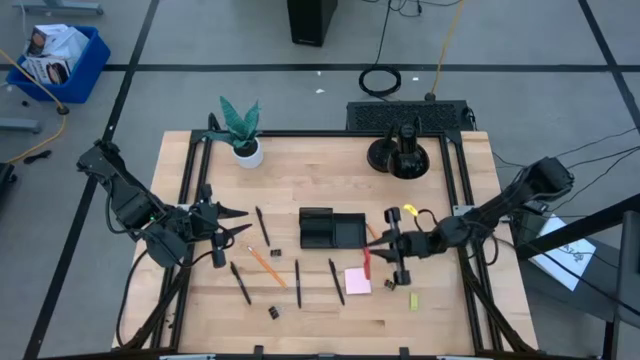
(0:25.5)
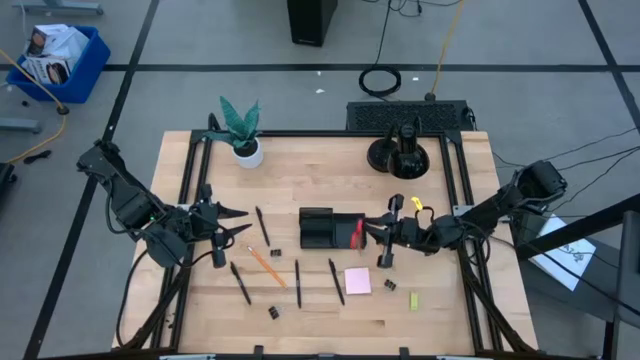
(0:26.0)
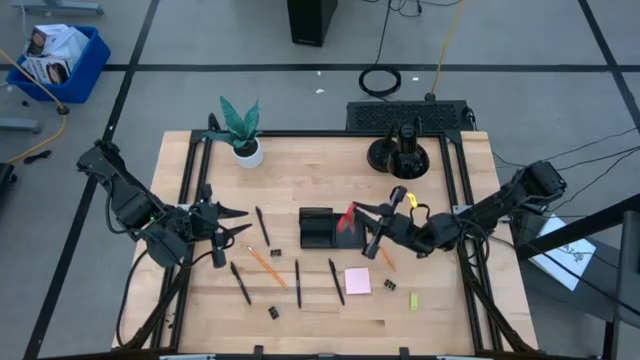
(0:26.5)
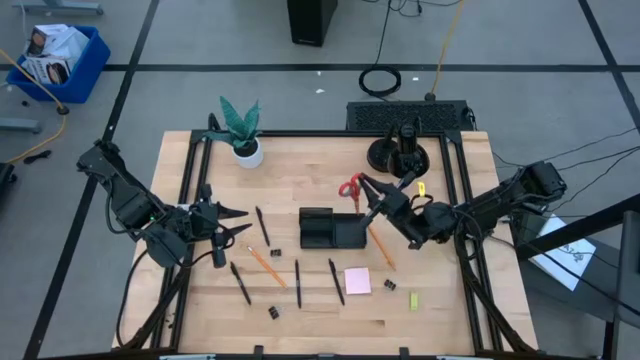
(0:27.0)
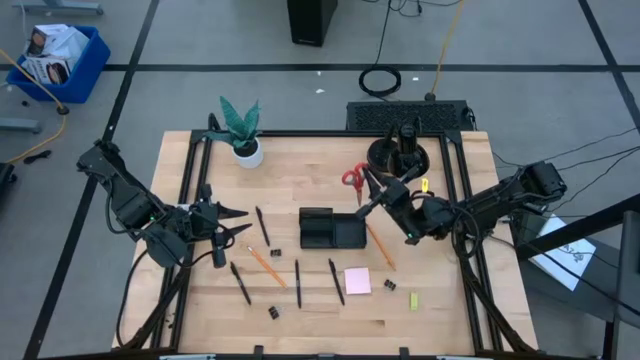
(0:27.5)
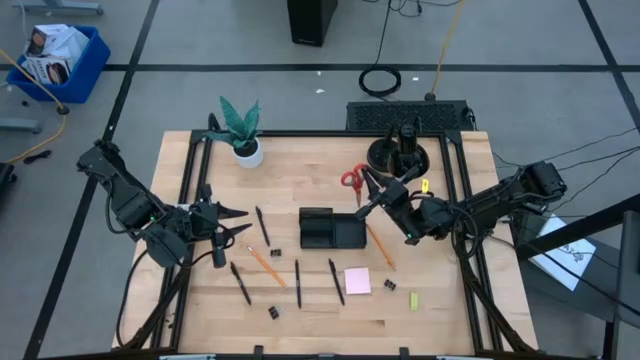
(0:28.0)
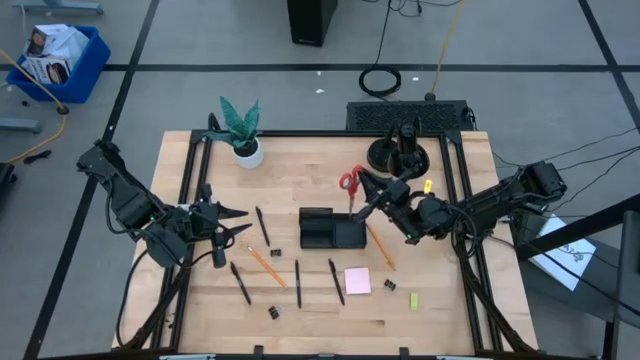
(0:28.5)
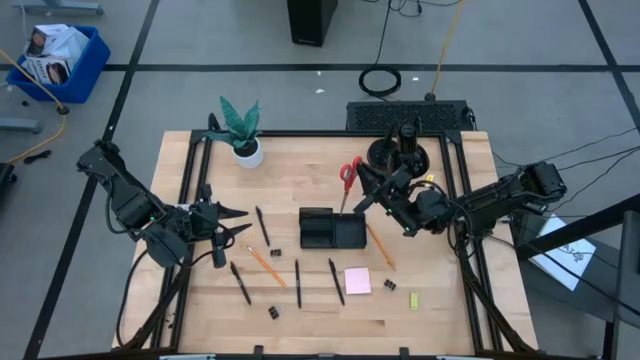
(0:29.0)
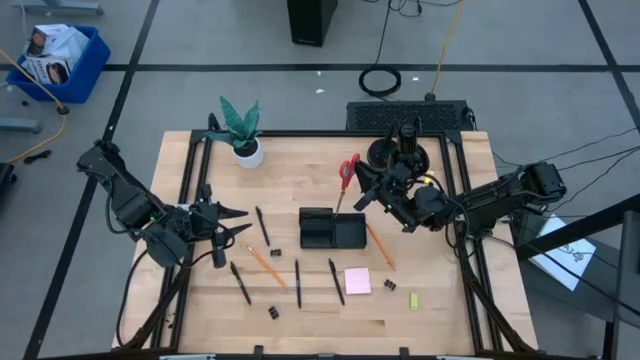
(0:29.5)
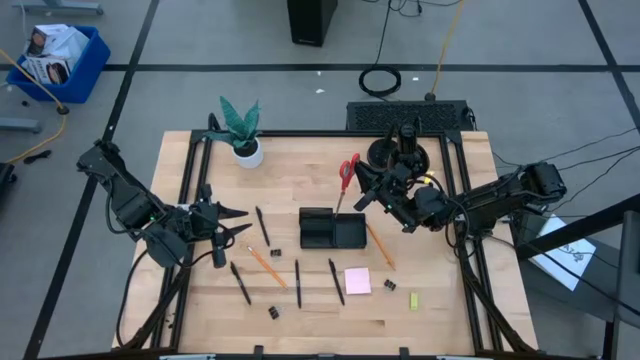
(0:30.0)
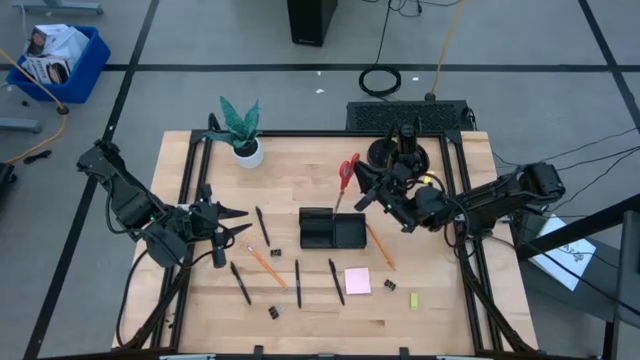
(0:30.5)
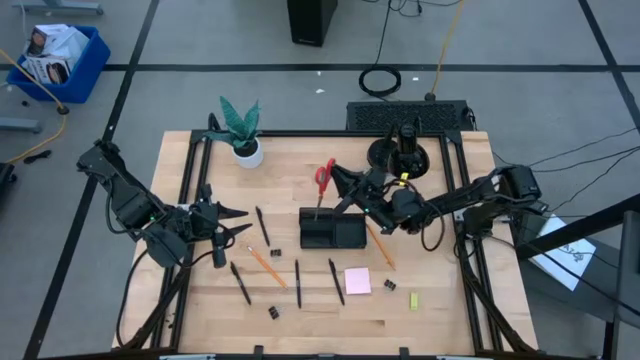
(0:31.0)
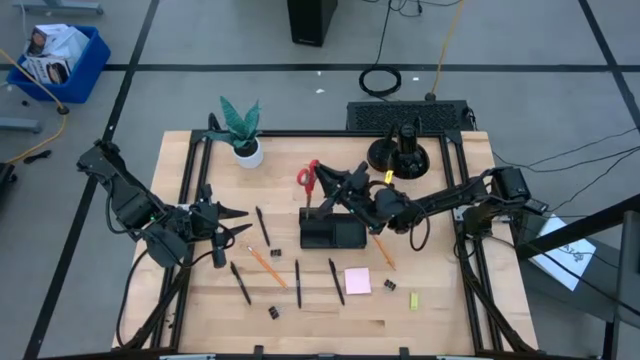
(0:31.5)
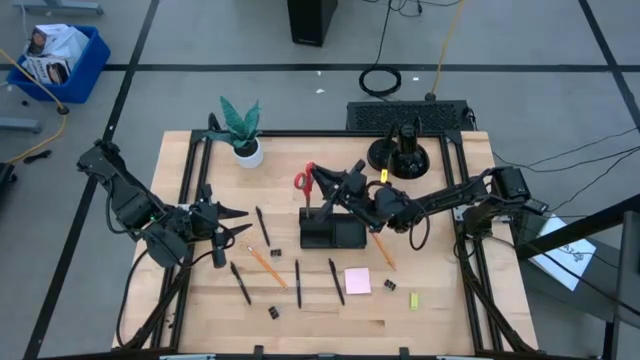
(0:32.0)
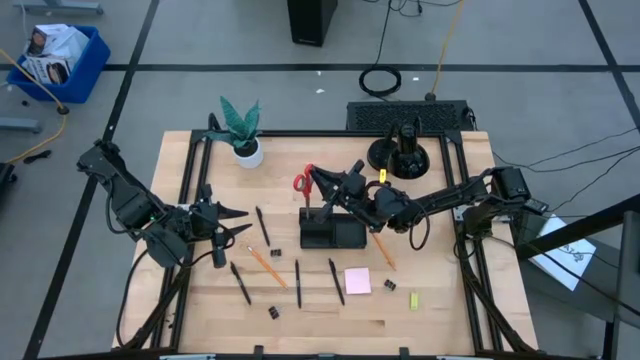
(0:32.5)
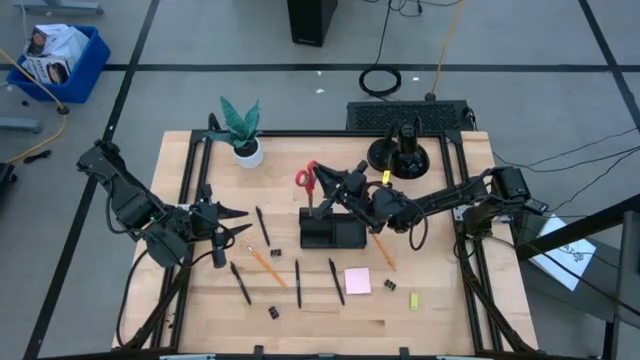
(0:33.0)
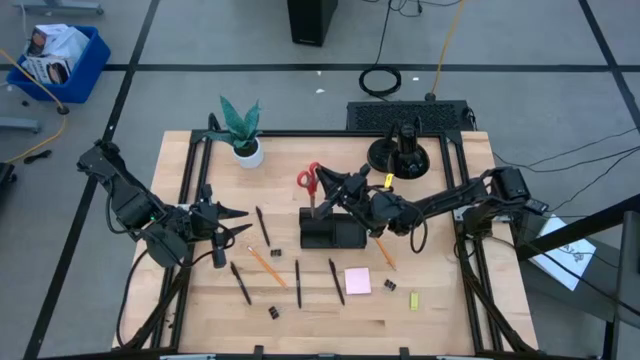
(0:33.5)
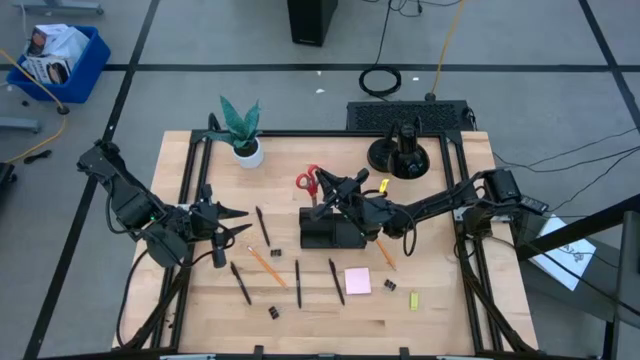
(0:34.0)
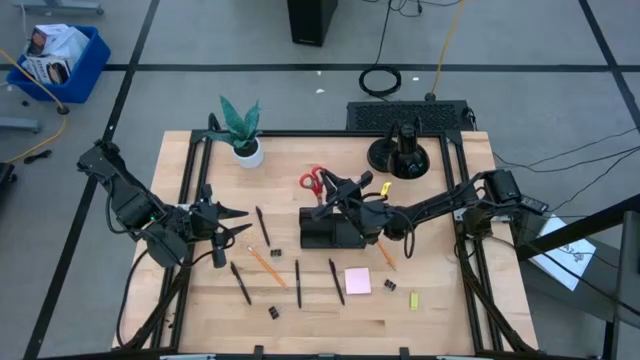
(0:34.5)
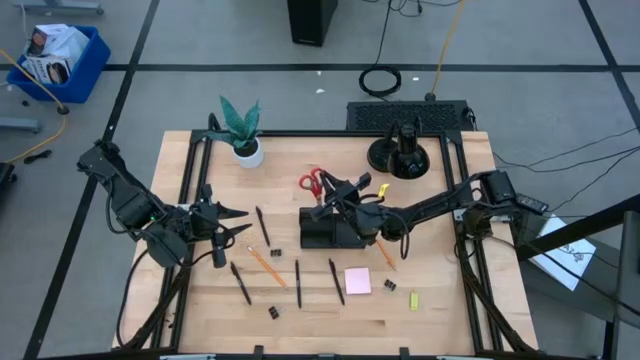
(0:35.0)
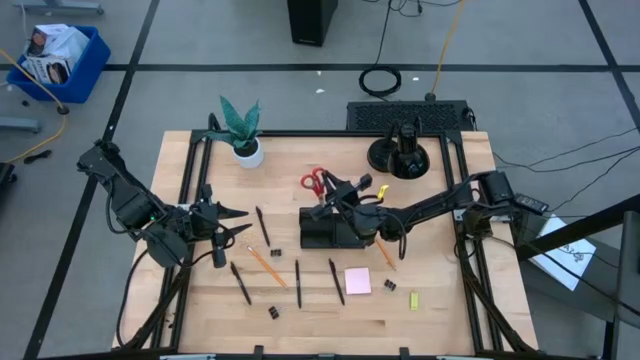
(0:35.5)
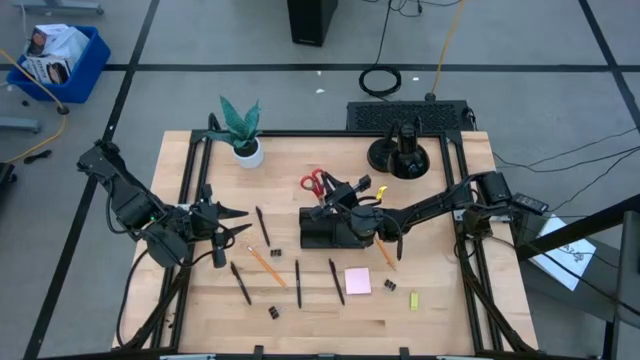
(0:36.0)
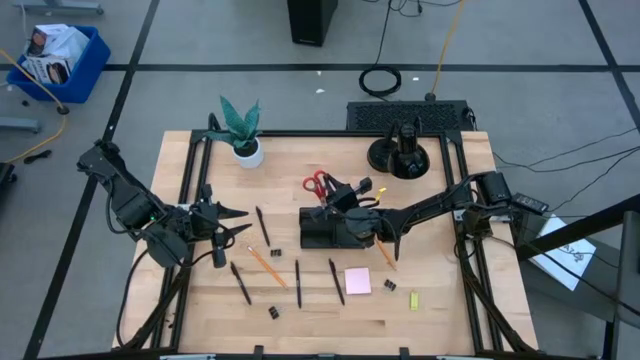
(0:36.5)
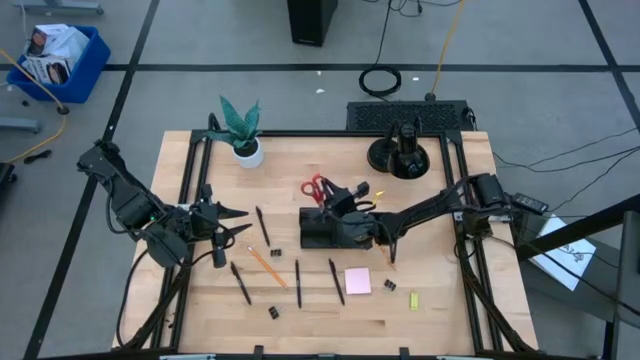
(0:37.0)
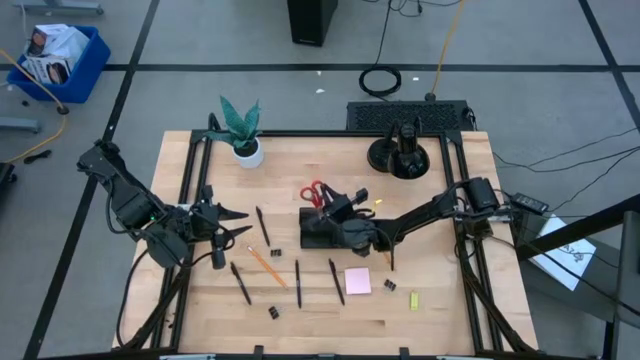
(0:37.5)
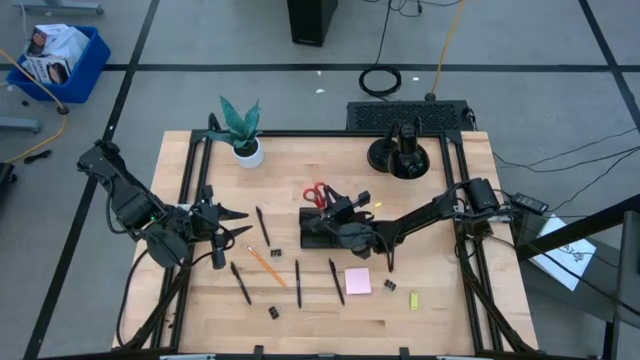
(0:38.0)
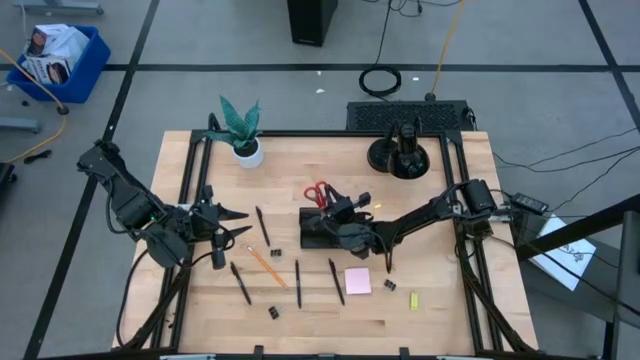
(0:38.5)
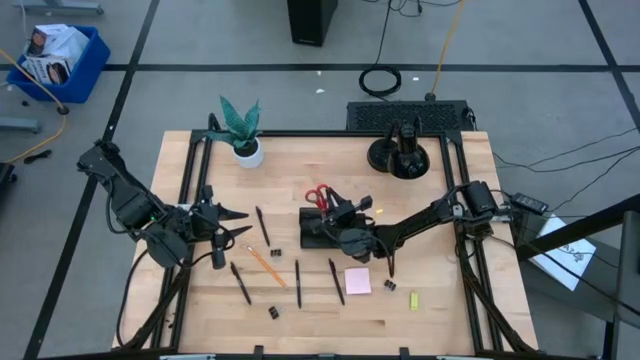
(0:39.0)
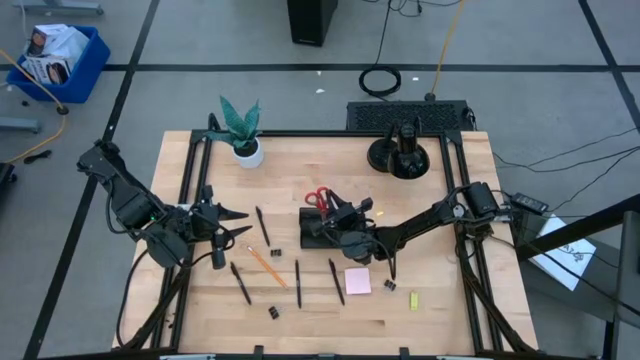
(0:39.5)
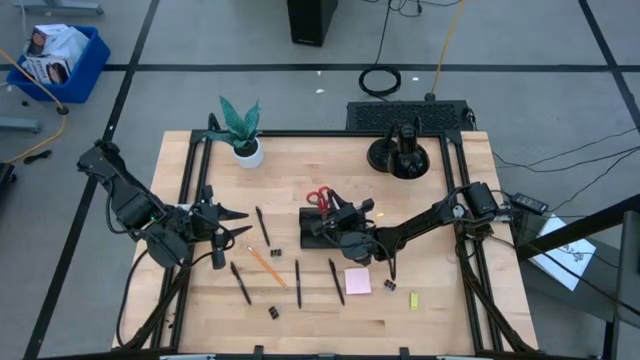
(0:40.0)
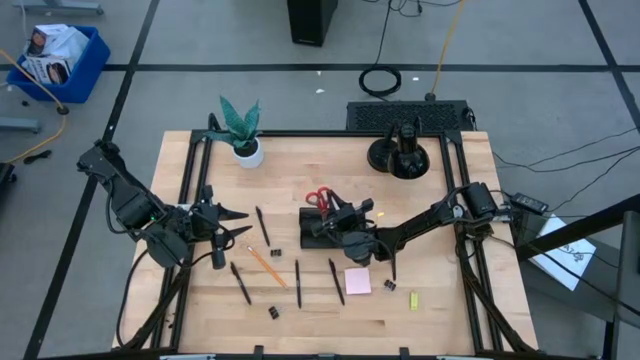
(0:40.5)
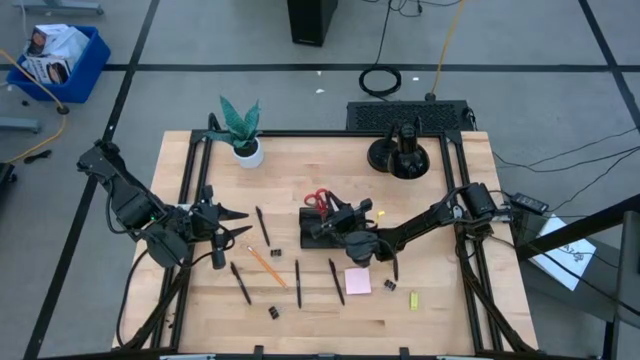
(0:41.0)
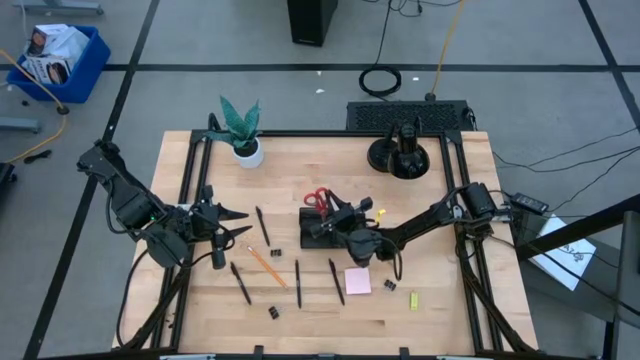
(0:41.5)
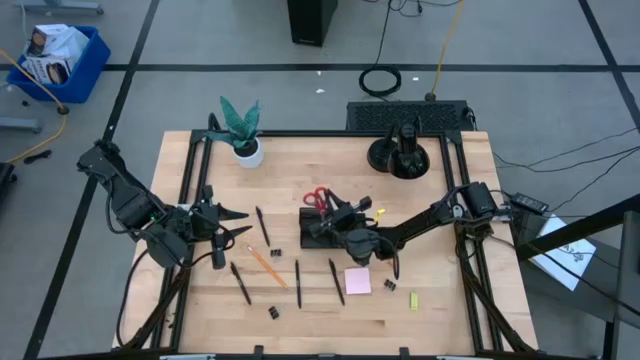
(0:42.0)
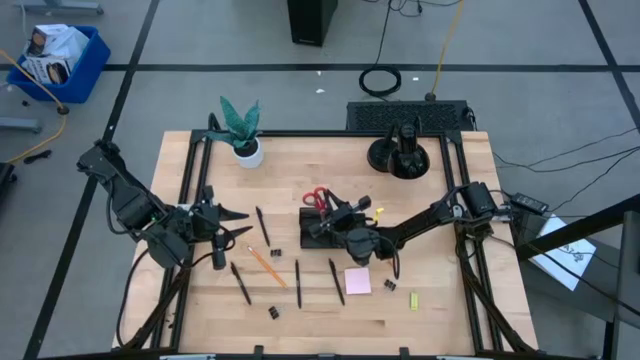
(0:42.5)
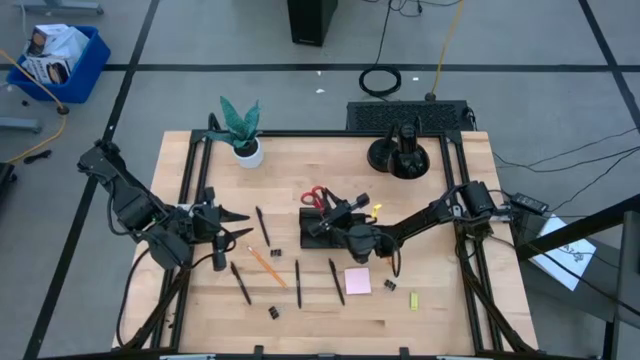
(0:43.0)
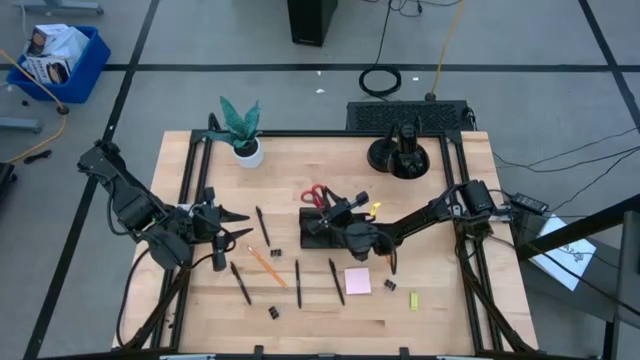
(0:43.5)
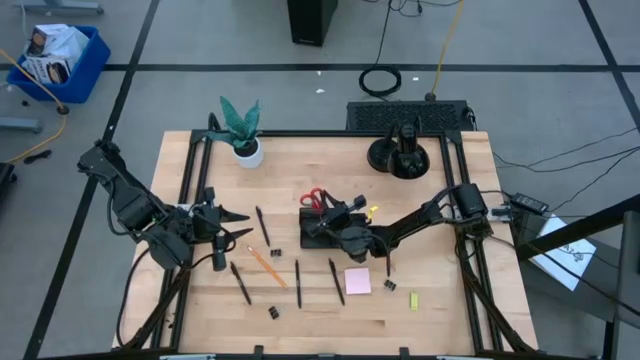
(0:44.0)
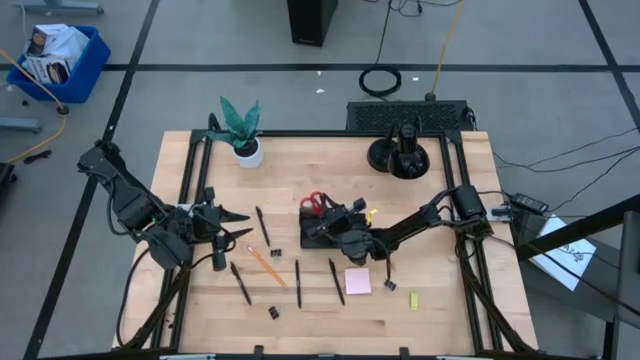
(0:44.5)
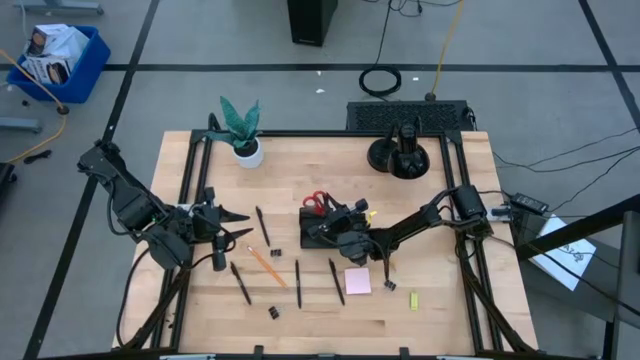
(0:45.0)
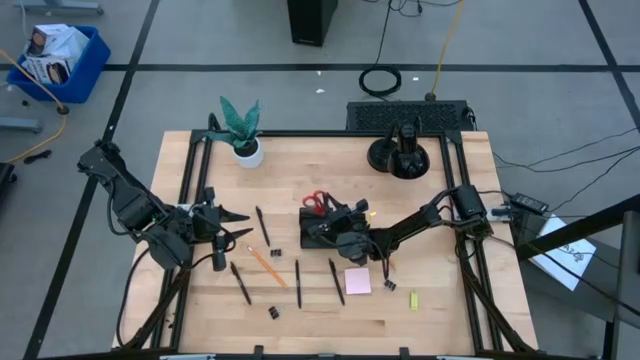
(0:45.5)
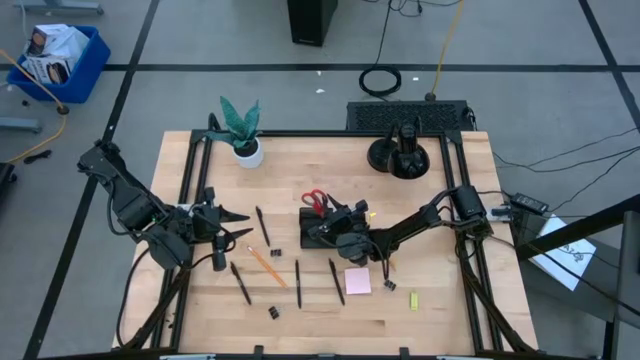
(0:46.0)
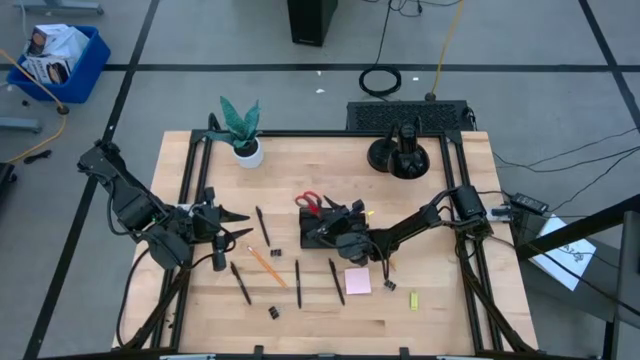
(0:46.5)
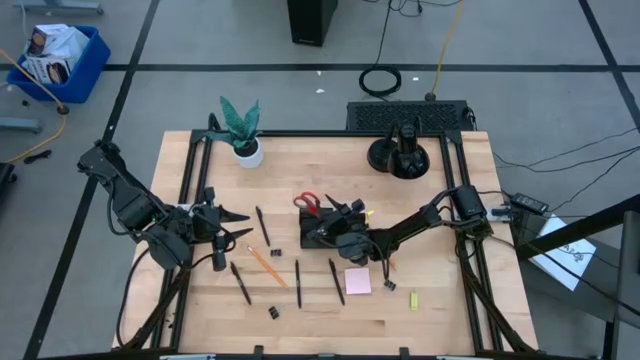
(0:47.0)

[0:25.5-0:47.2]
Task: Pick and place office supplies into organizer
Put the scissor into the desk organizer
